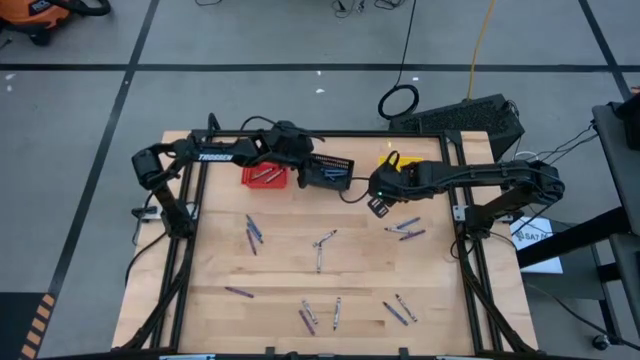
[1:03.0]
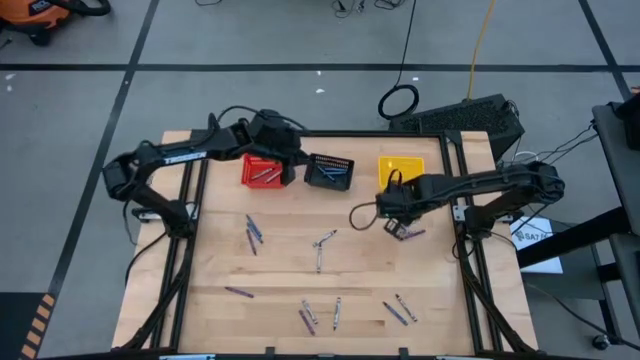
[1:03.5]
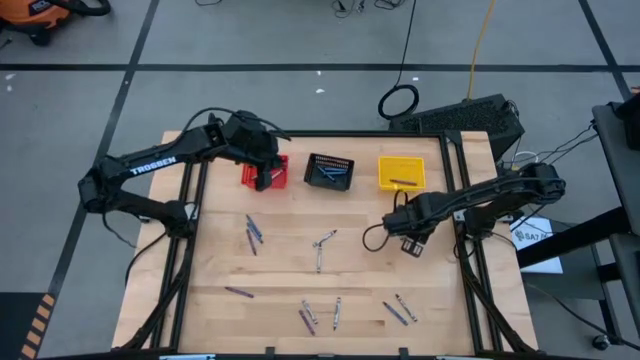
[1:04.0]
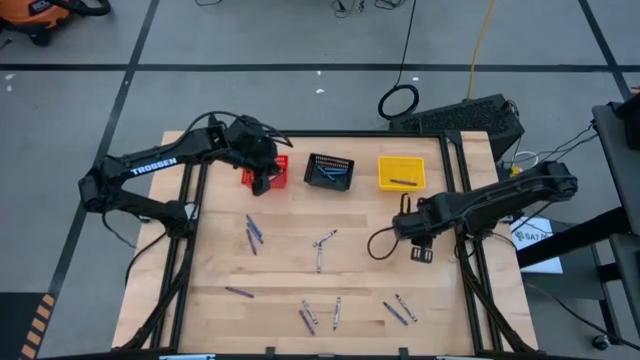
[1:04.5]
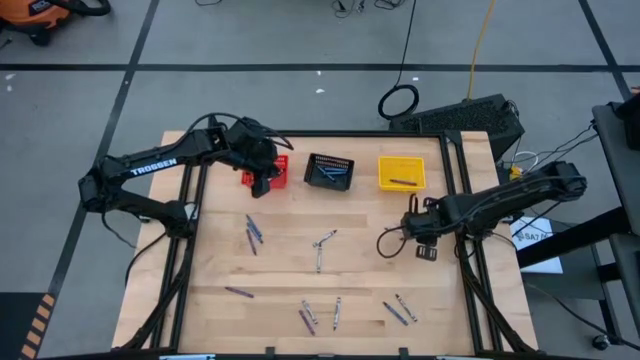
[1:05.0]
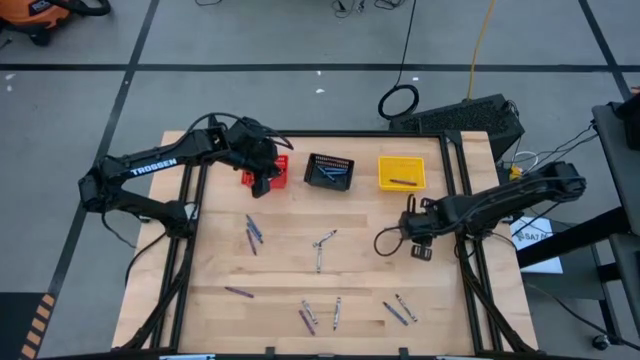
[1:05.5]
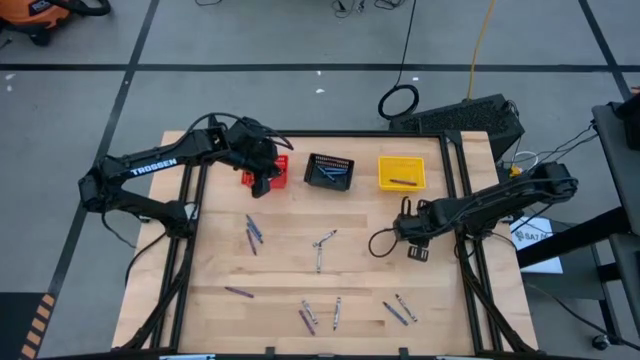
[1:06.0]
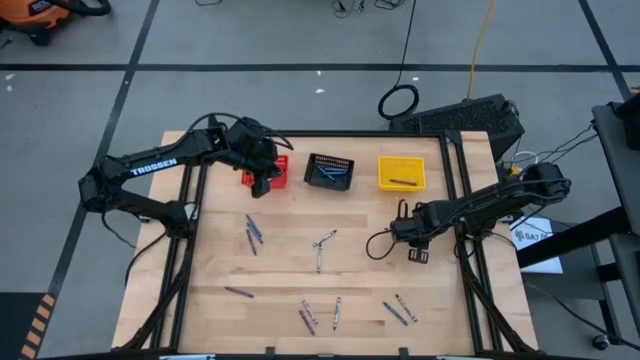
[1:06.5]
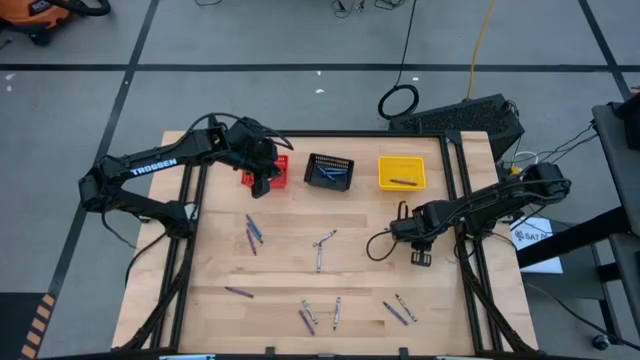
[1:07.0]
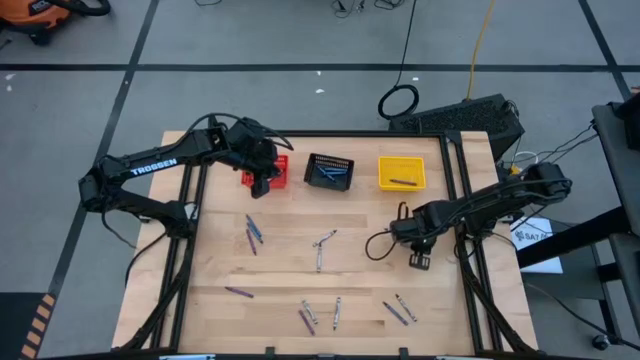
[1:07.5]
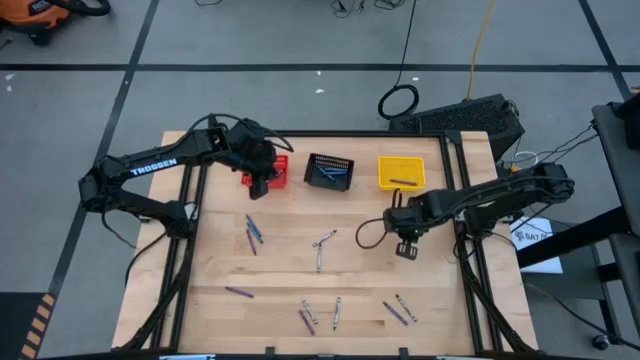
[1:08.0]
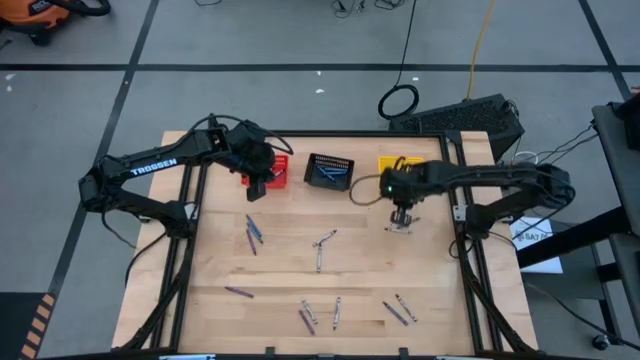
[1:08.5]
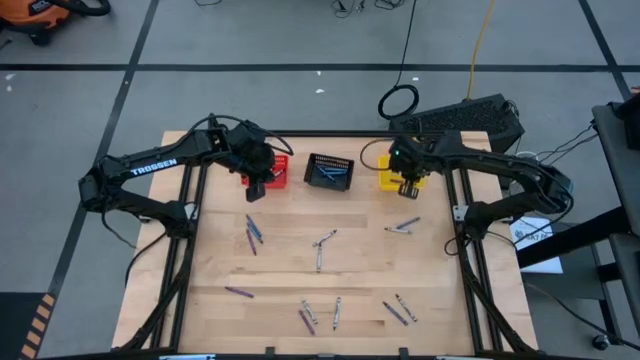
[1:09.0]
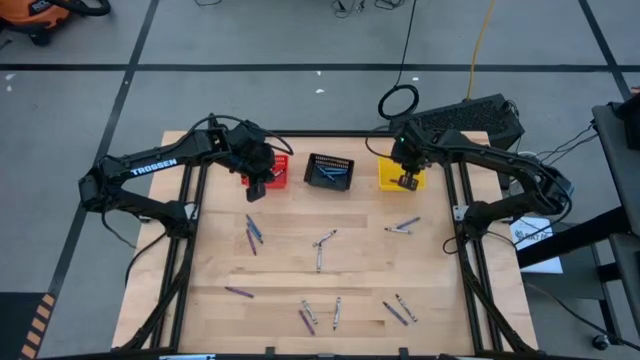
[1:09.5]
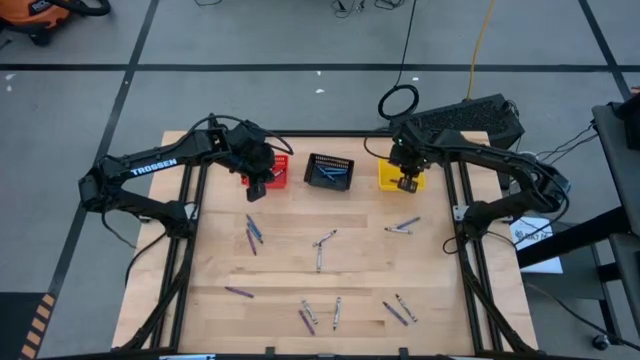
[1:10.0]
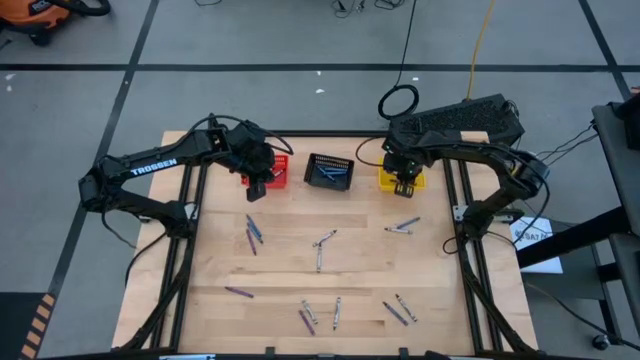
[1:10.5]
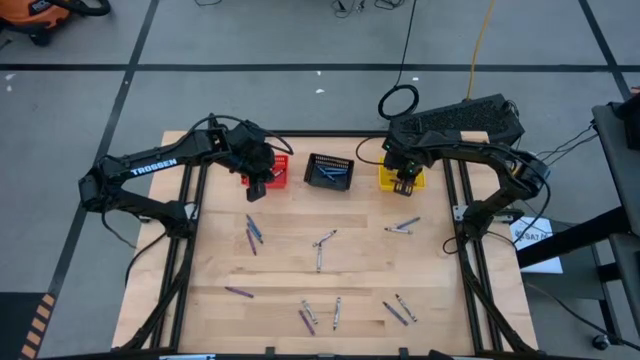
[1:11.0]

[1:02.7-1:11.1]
Task: Sort crayons
Put the violet crayon into the yellow bin

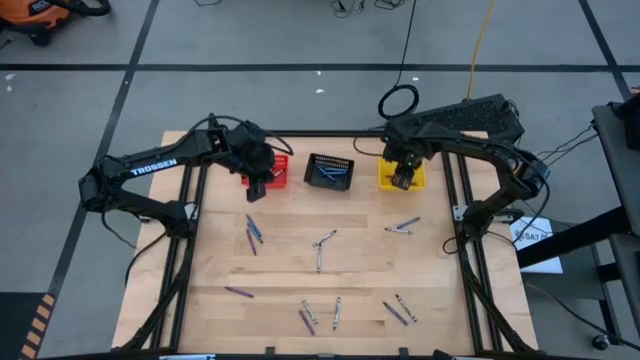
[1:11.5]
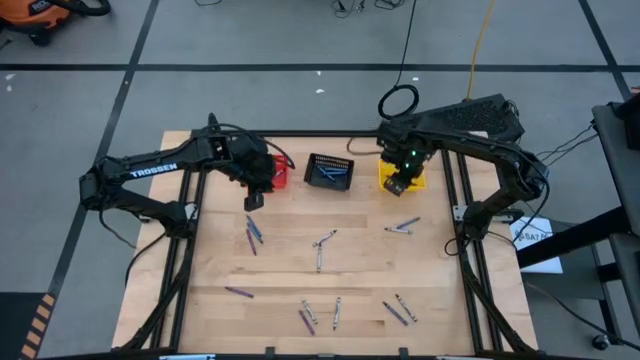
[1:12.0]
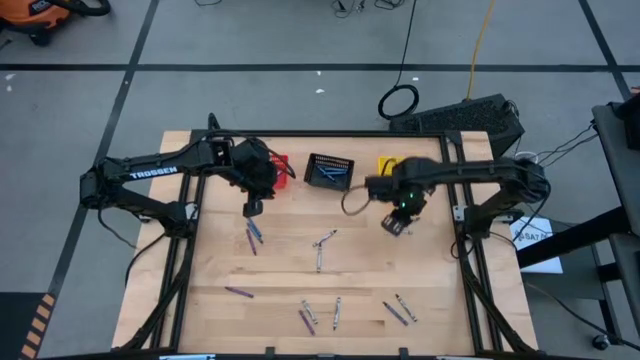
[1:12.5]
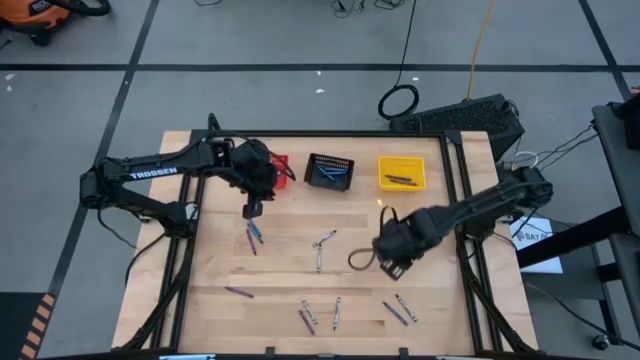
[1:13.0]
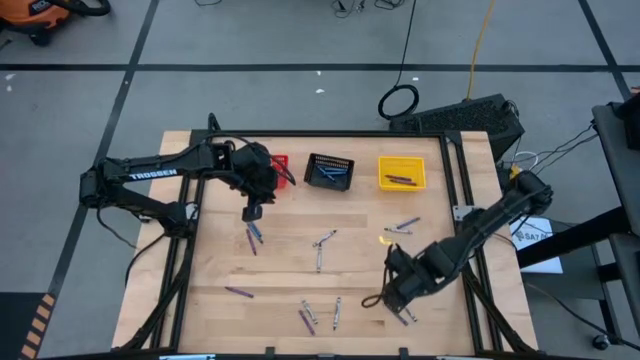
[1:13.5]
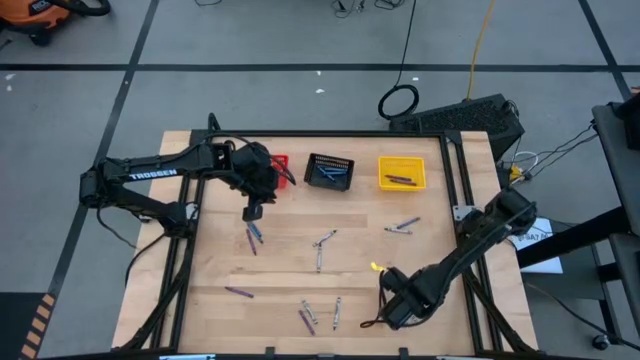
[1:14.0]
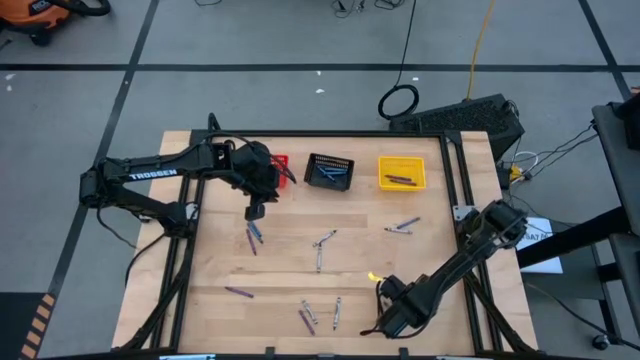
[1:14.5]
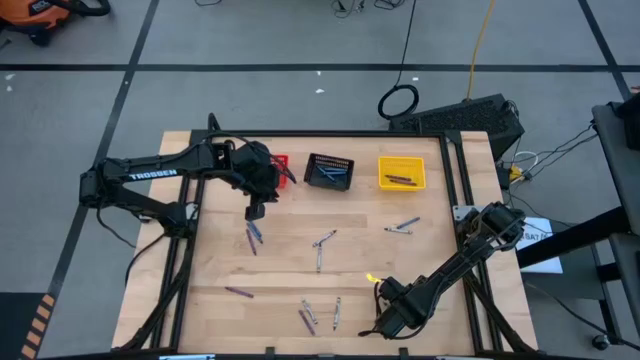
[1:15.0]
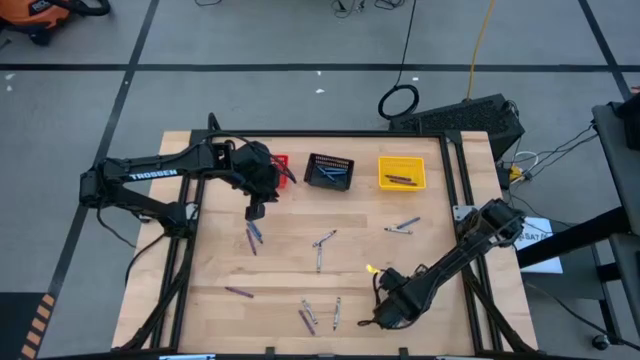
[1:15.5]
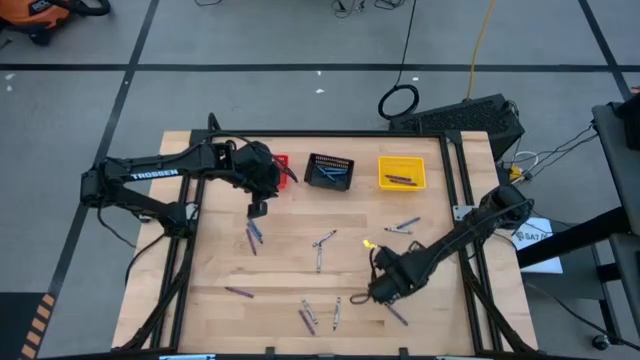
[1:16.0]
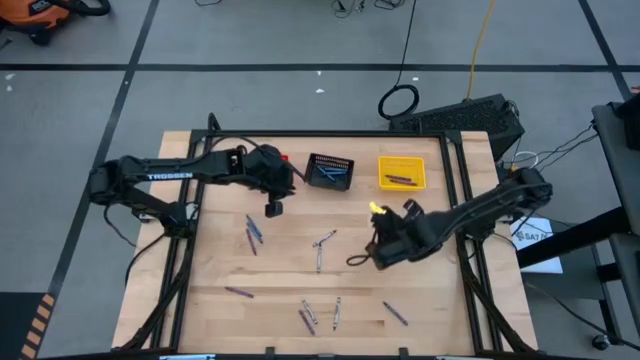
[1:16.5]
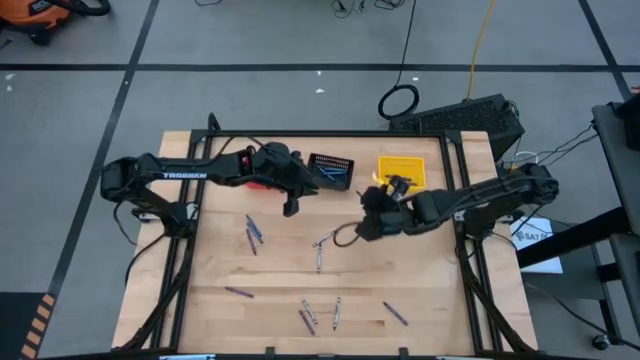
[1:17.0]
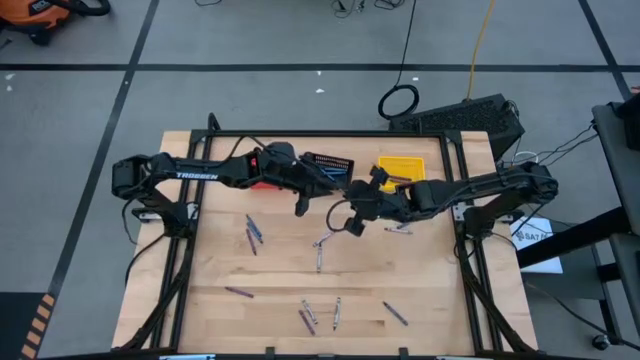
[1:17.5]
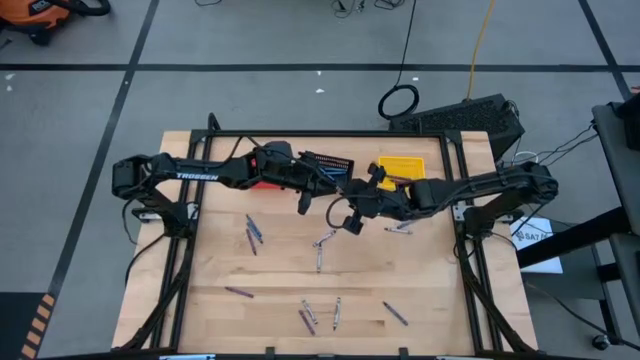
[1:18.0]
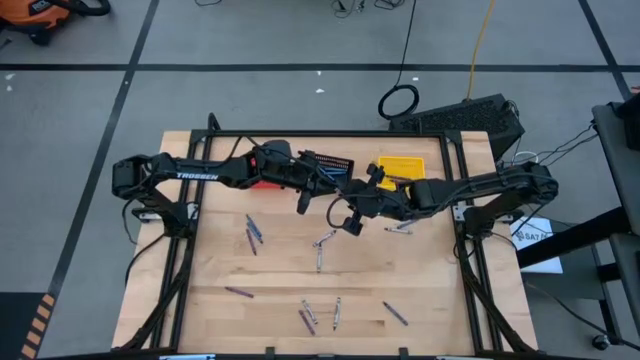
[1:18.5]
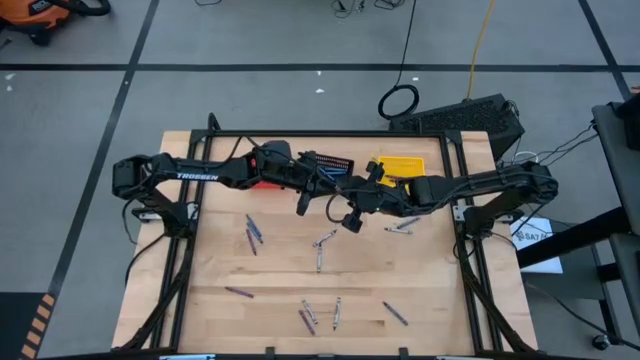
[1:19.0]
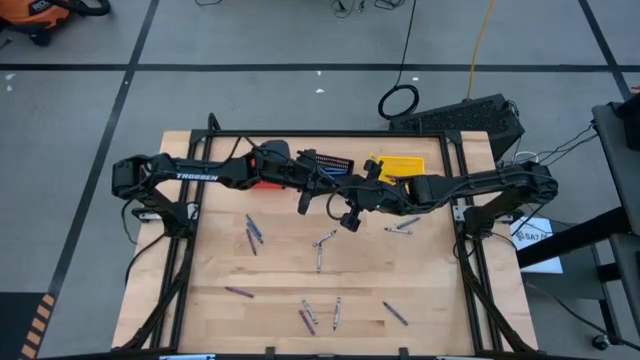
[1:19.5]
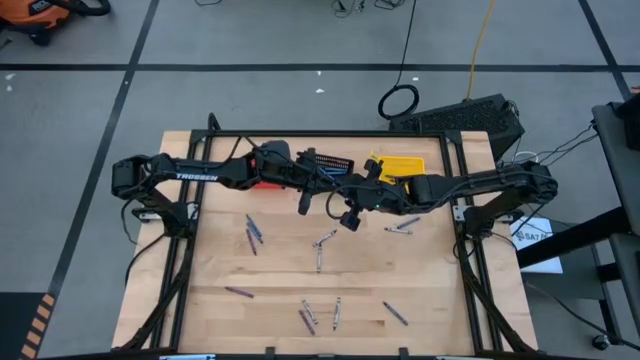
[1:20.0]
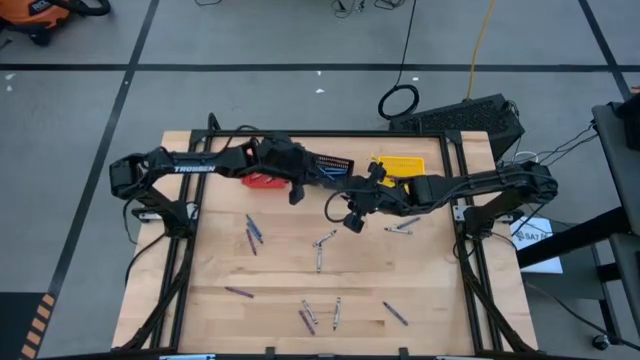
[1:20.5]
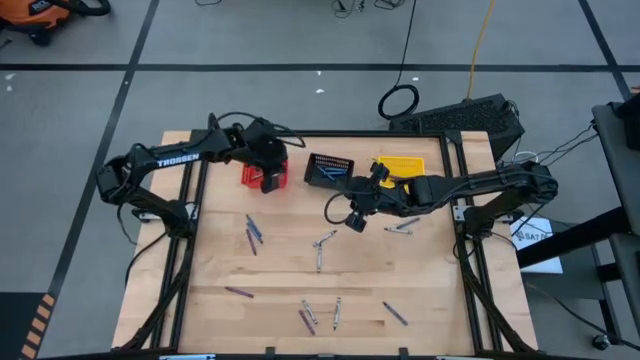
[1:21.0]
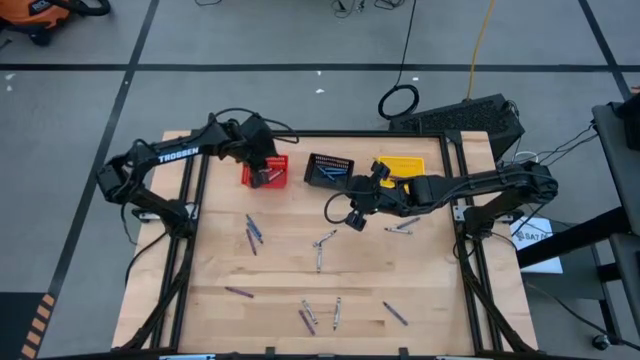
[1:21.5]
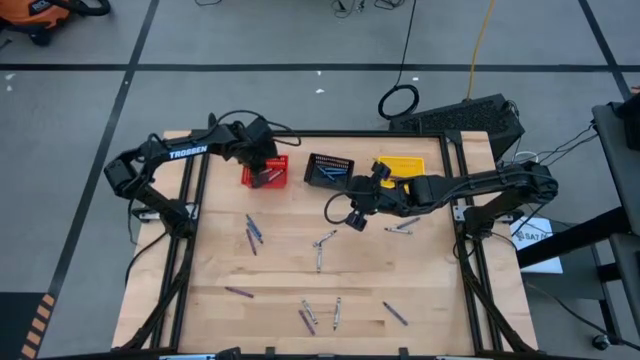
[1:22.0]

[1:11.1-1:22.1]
Put the gray crayon into the red bin

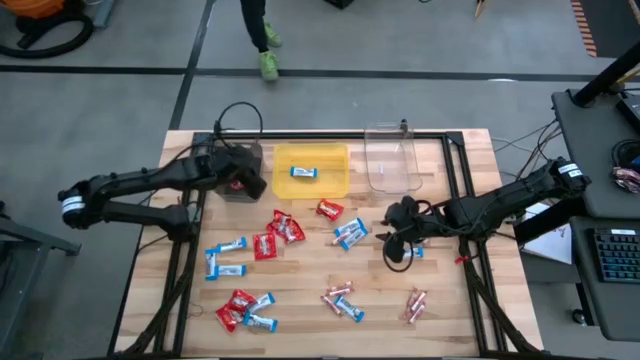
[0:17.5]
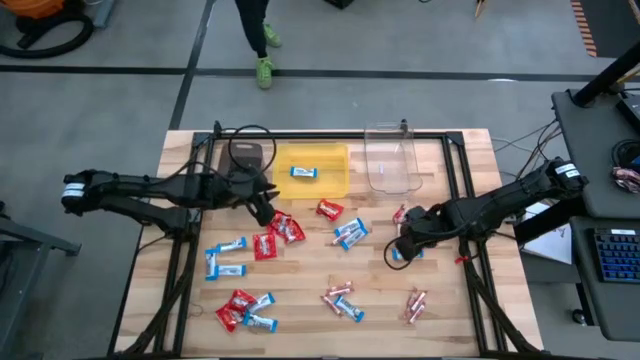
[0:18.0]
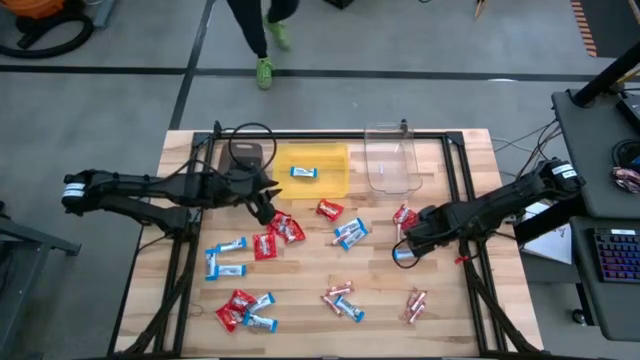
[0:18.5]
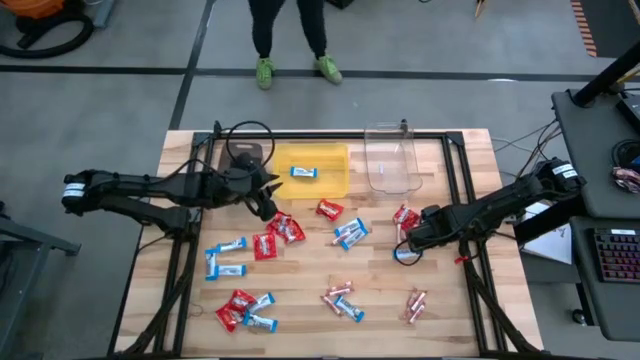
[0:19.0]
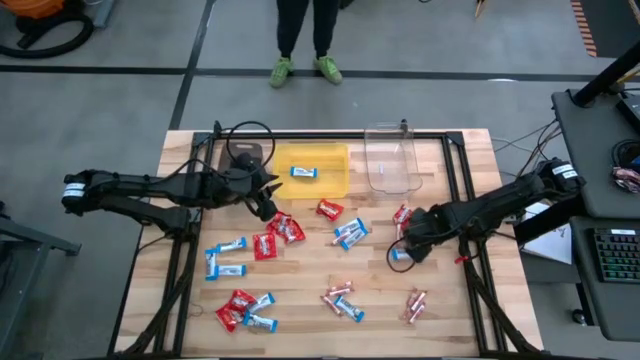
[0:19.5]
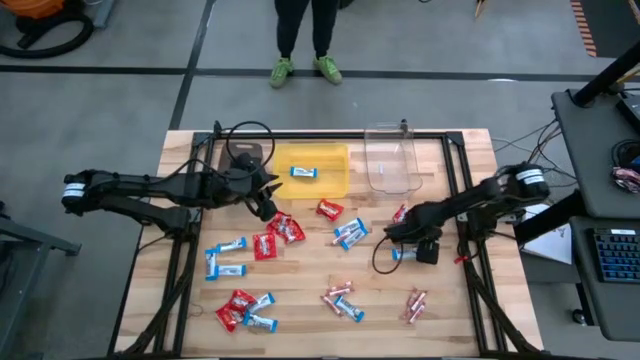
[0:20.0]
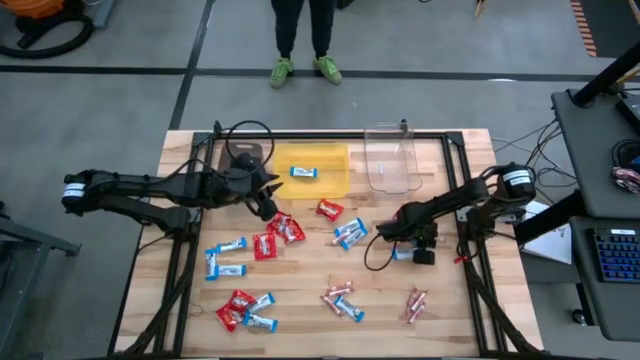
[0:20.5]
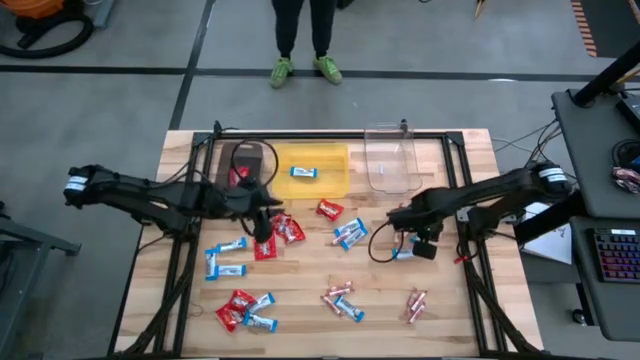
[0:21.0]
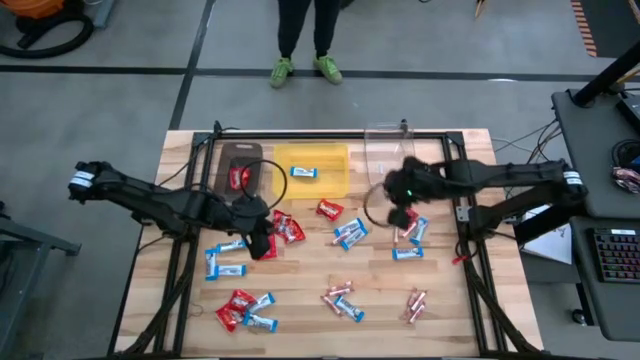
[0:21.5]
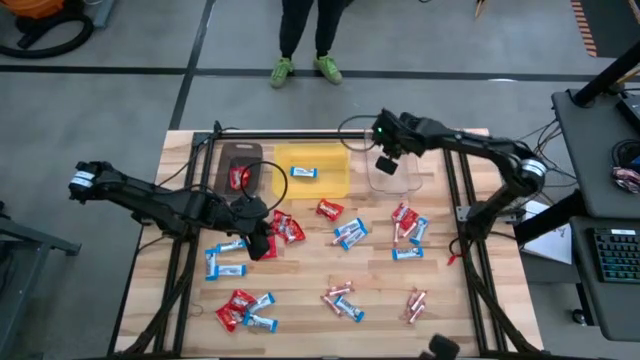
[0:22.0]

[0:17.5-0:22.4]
Task: Sort candy
Put the orange candy into the transparent bin
